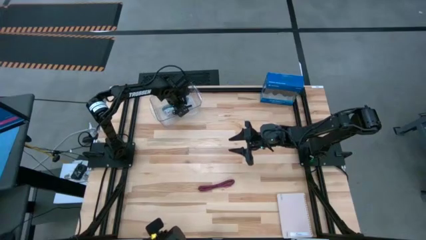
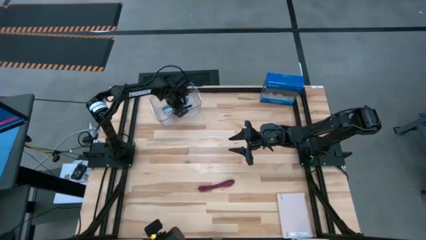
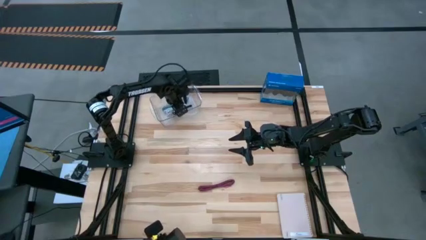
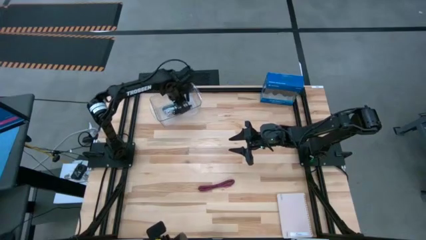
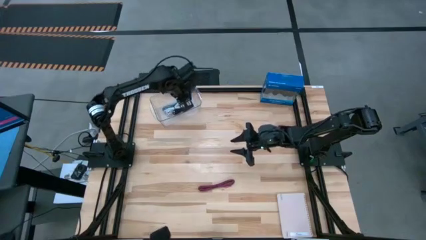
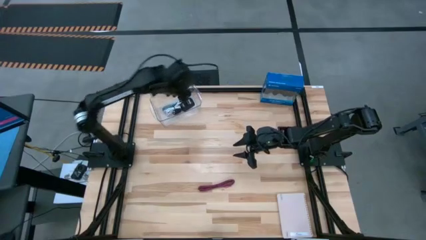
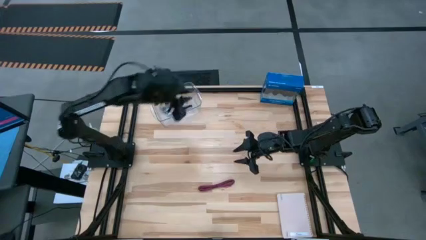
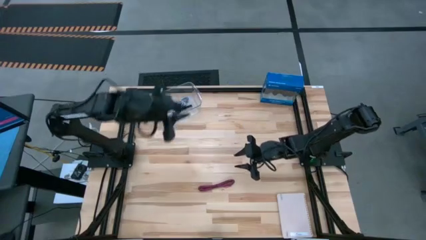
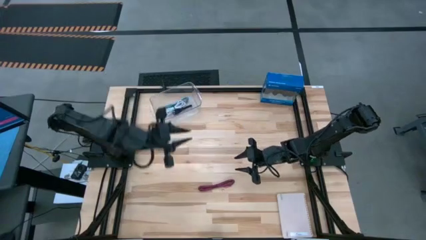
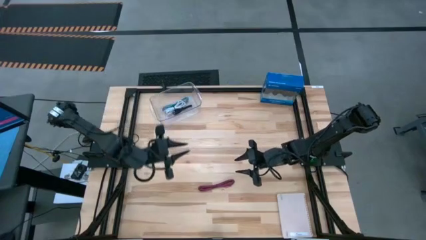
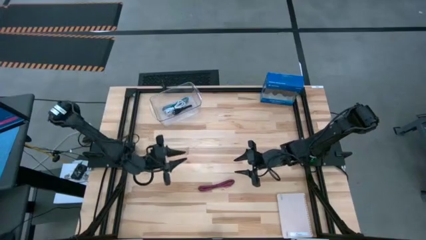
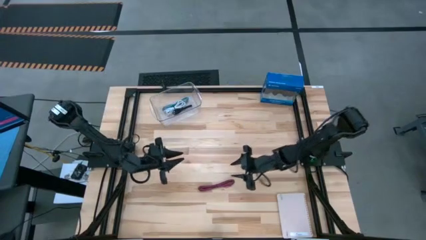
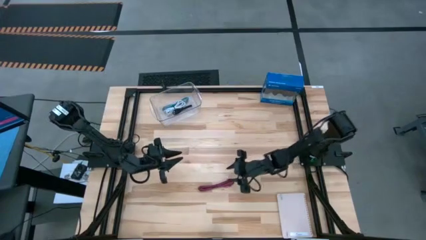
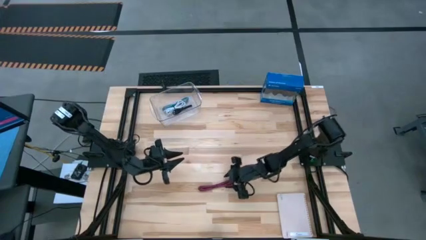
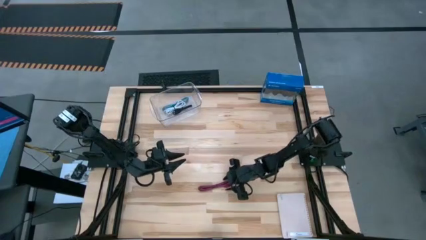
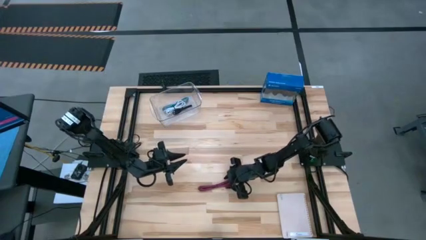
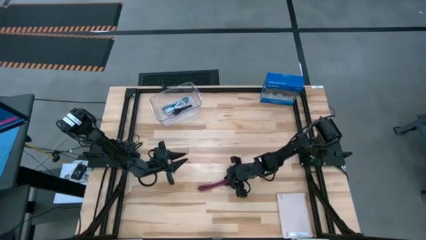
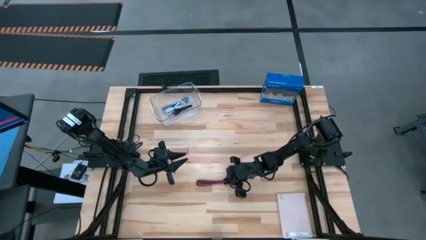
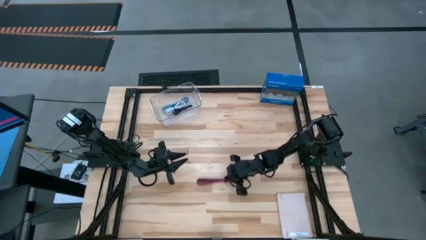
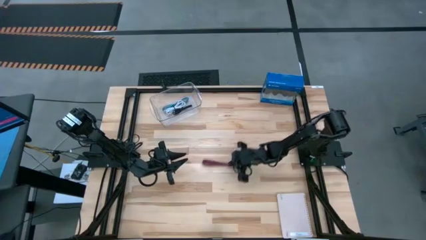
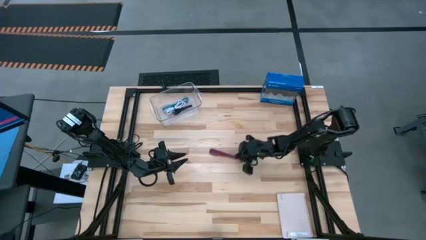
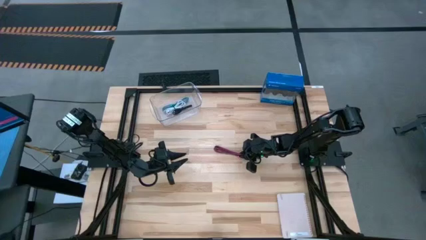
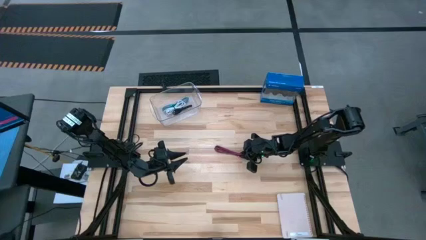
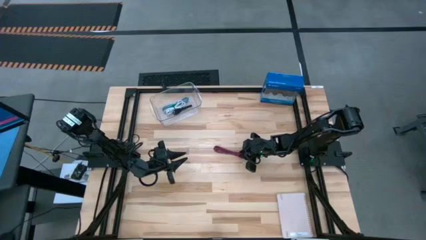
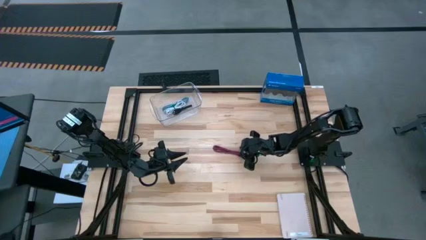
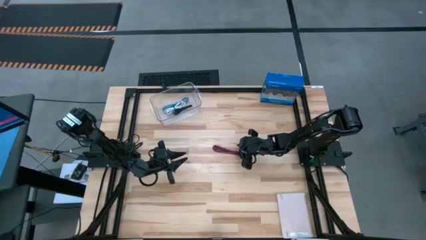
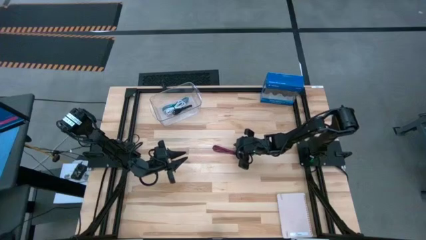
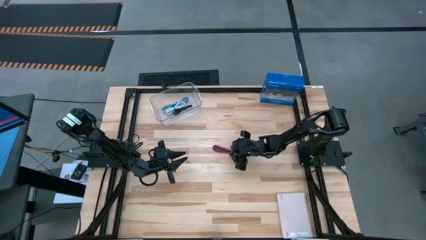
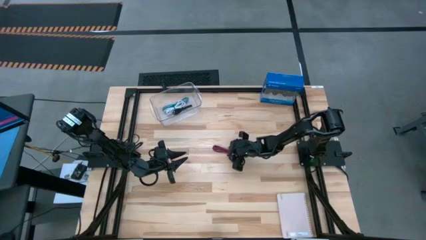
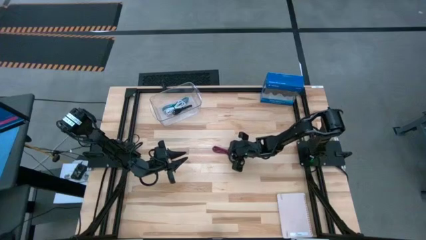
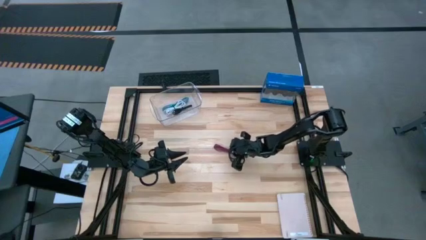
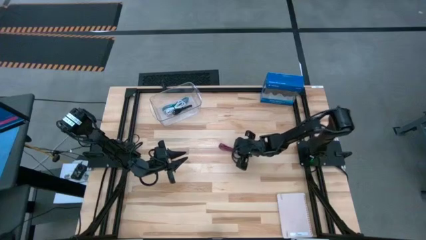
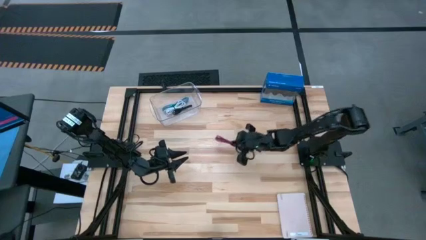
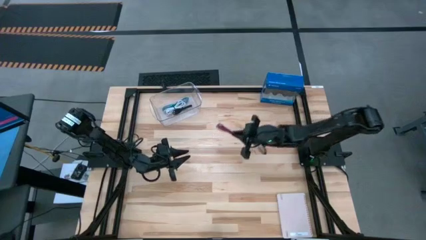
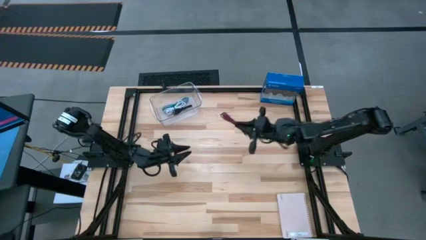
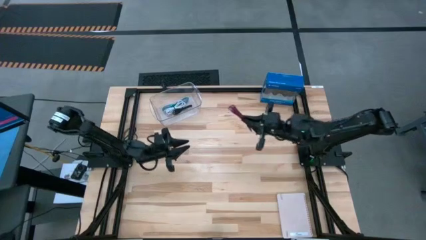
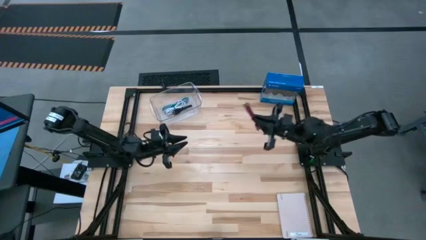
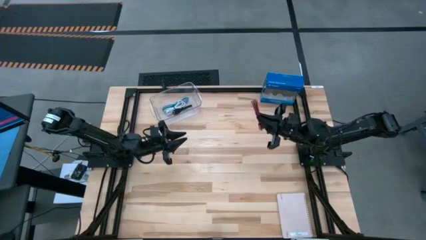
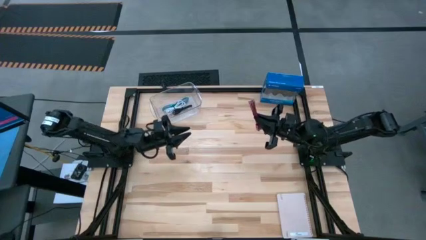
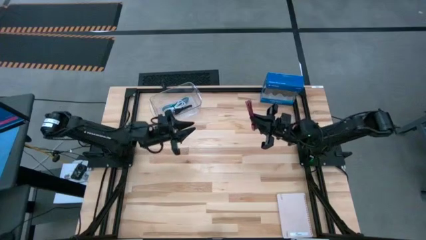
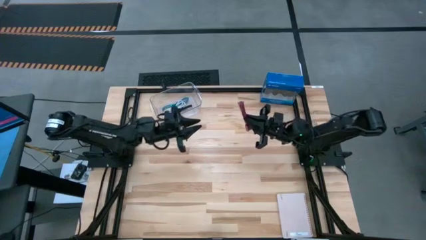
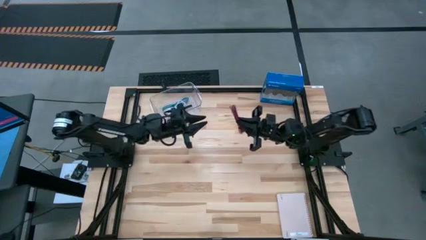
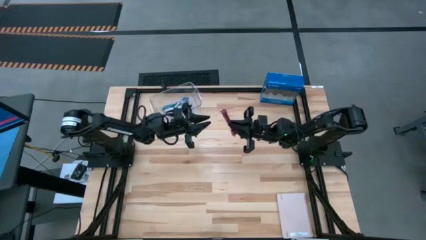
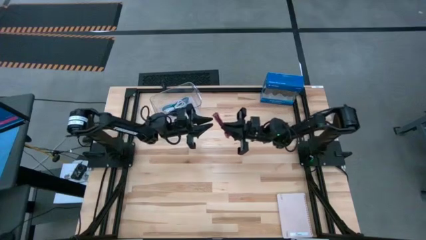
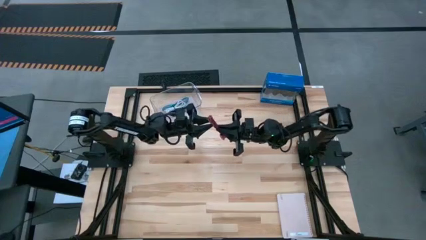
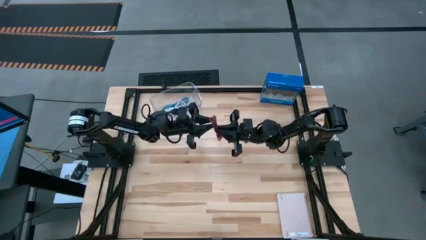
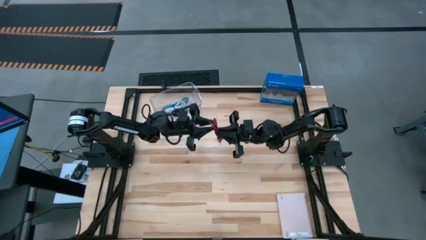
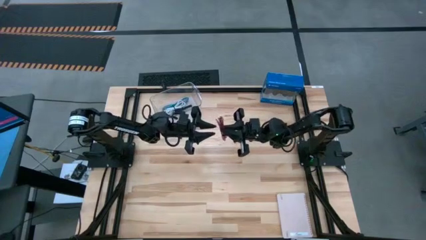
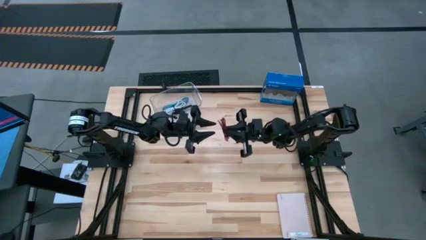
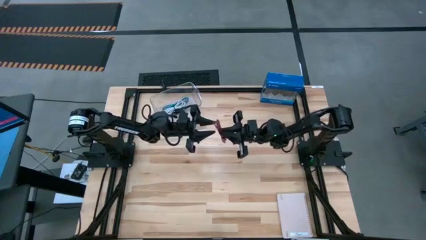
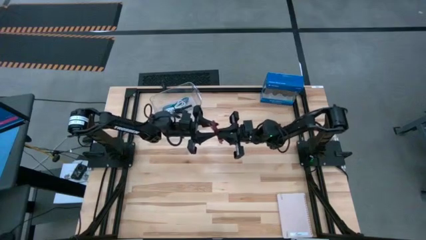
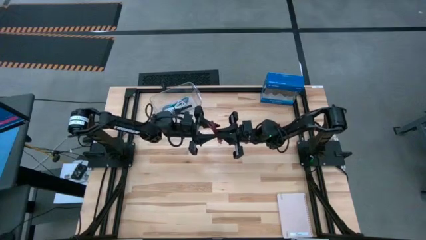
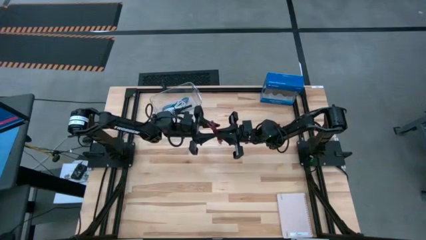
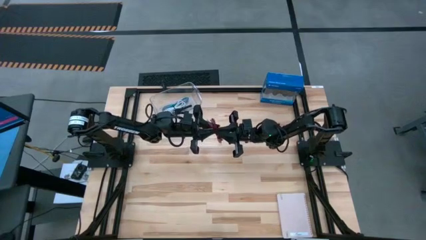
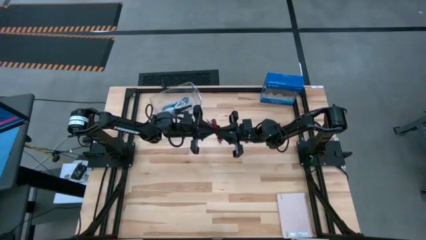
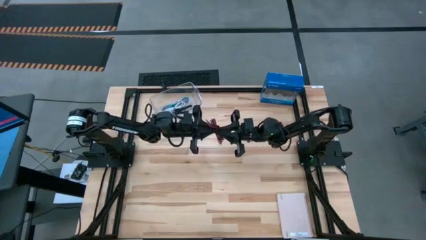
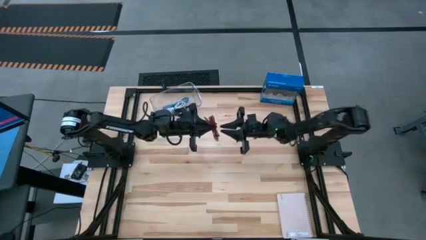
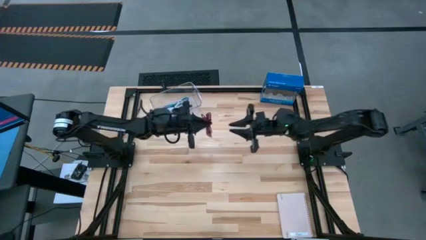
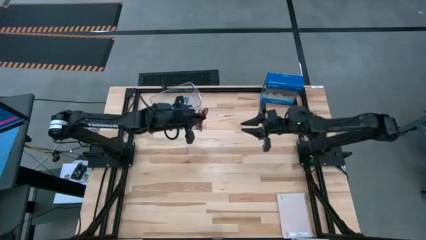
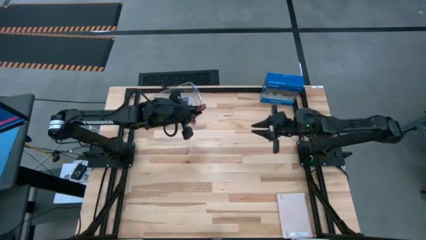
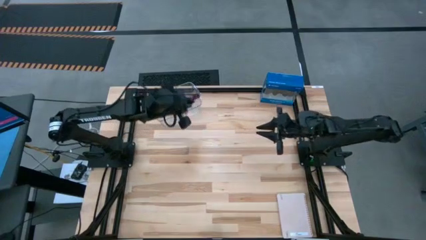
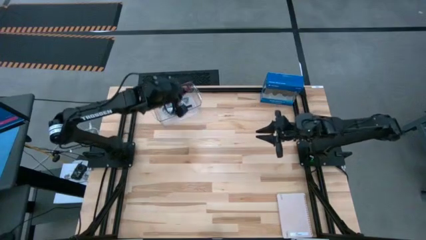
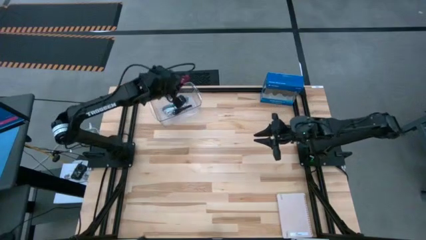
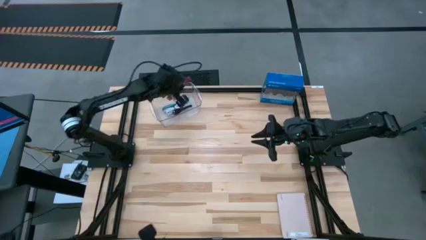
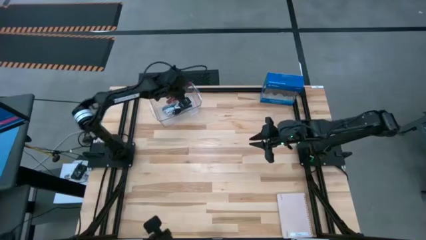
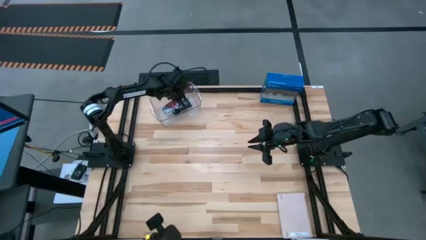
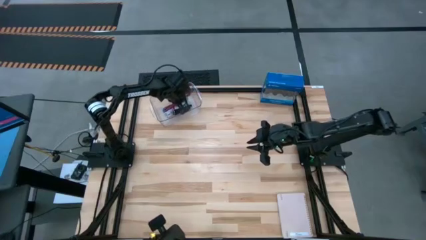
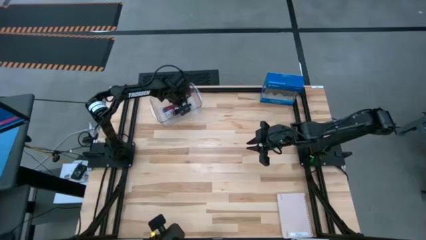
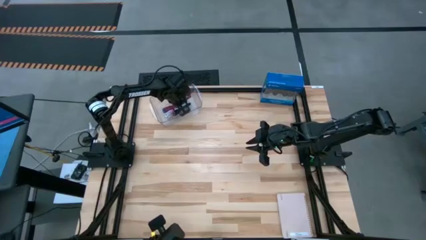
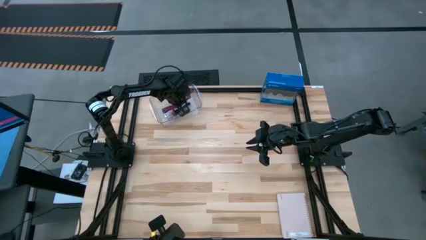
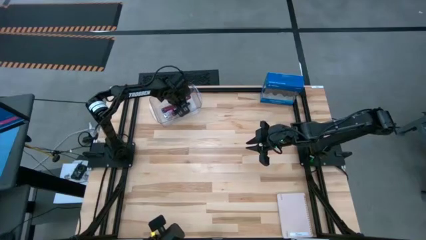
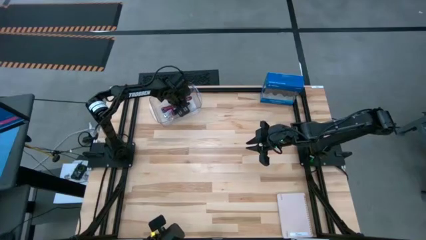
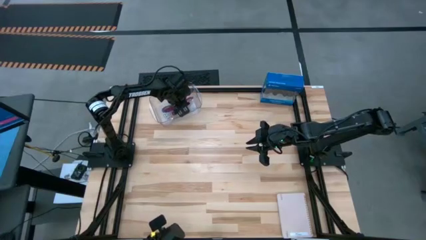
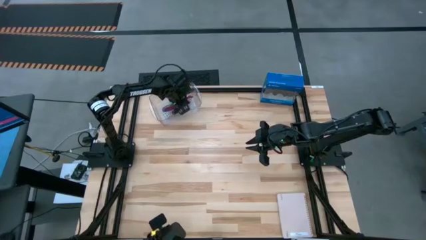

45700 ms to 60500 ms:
Task: Pick and place USB-C Cables
Put the pink charger cable into the transparent bin
